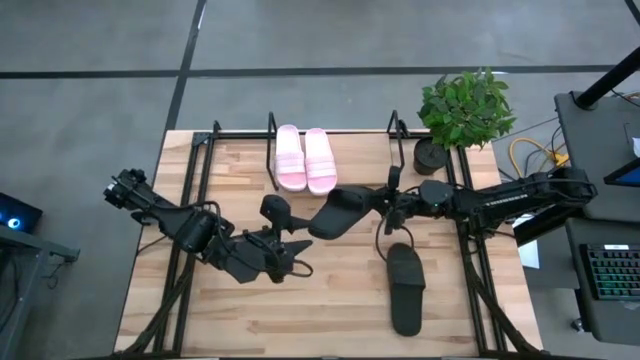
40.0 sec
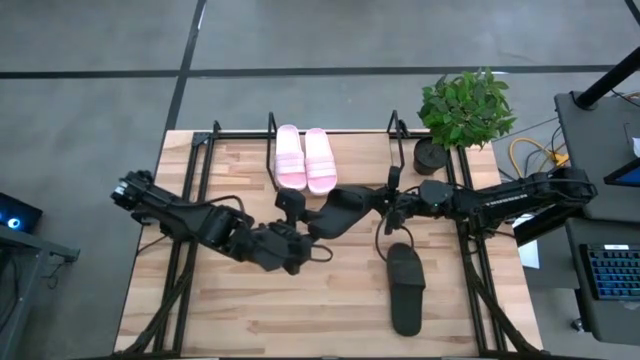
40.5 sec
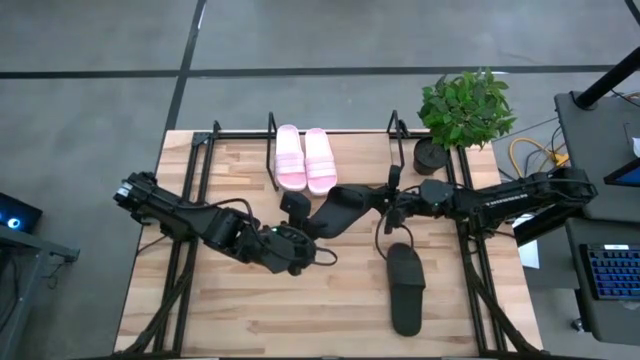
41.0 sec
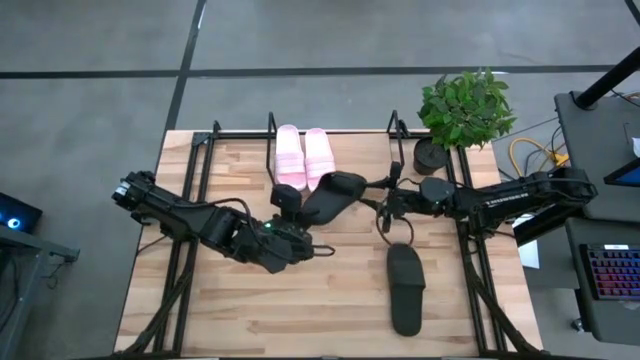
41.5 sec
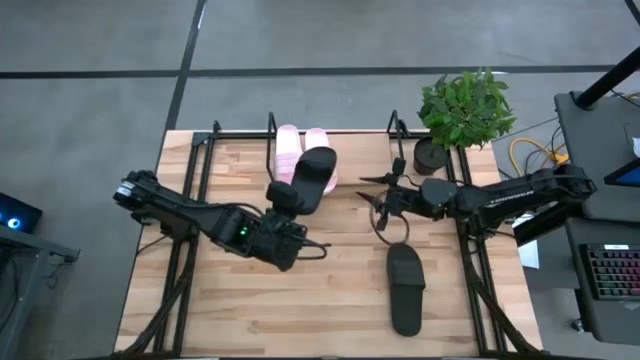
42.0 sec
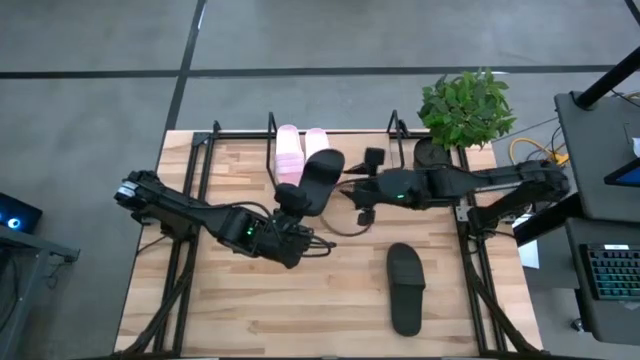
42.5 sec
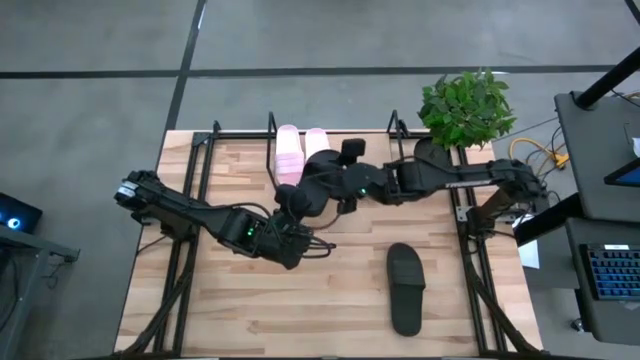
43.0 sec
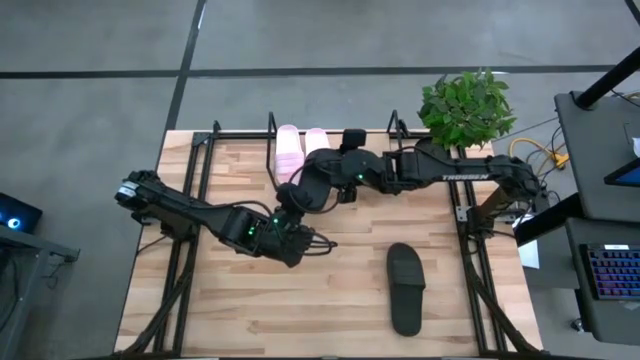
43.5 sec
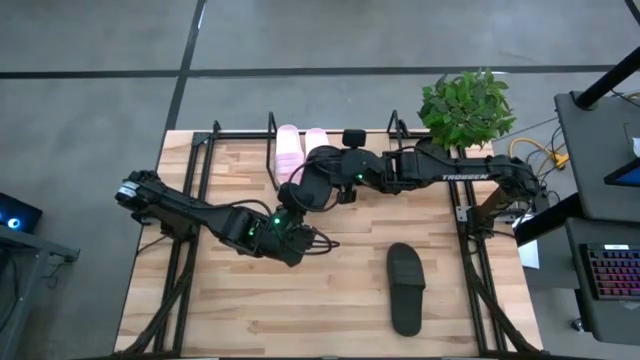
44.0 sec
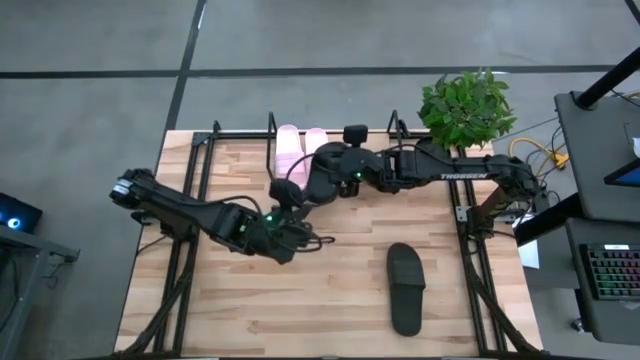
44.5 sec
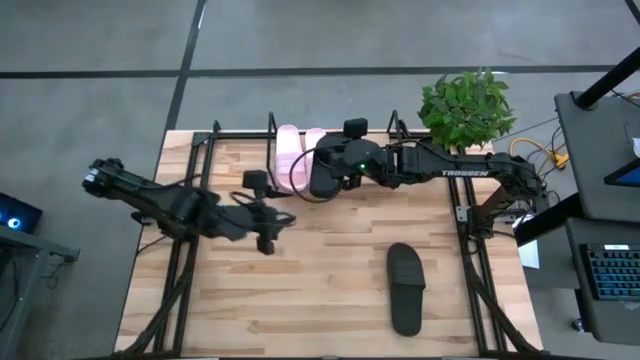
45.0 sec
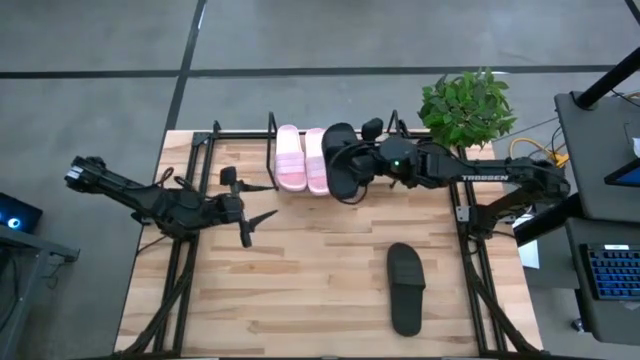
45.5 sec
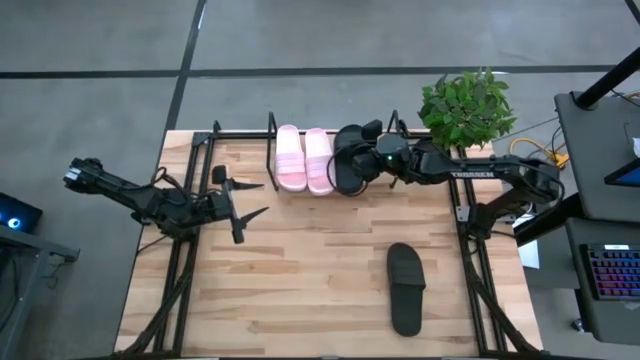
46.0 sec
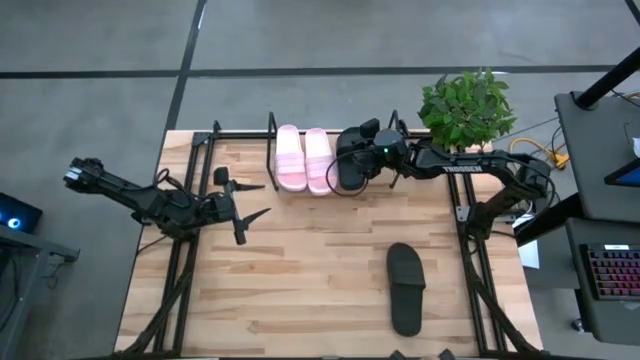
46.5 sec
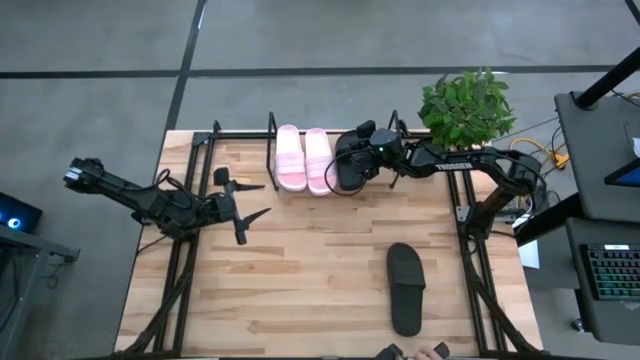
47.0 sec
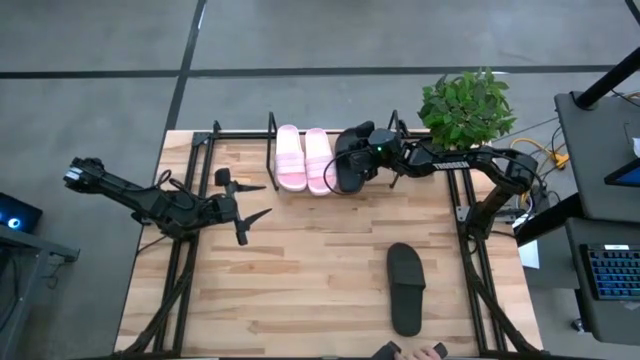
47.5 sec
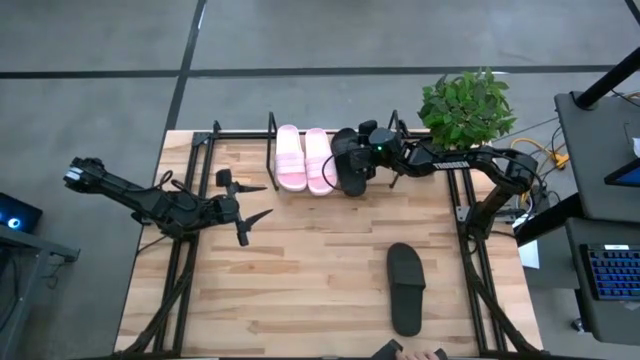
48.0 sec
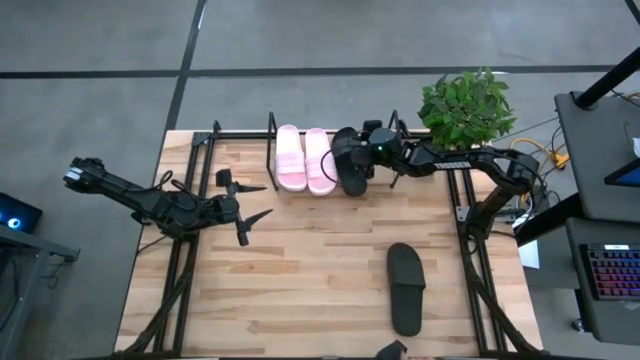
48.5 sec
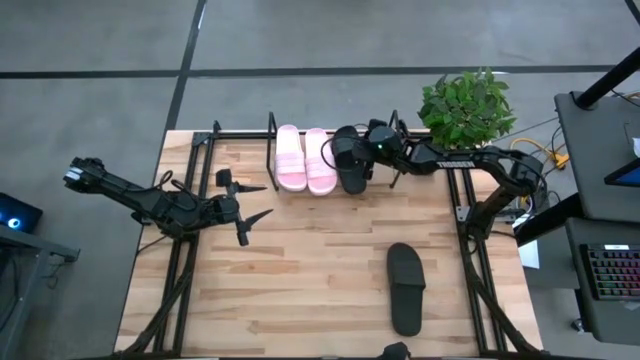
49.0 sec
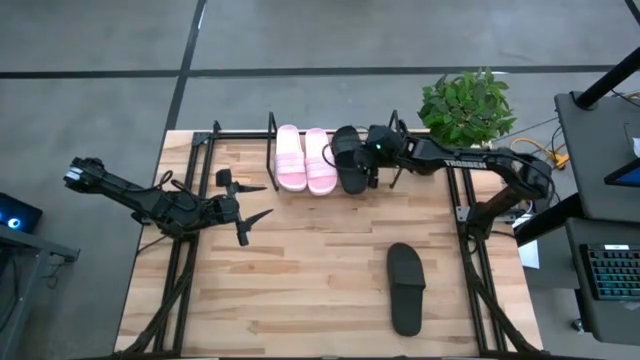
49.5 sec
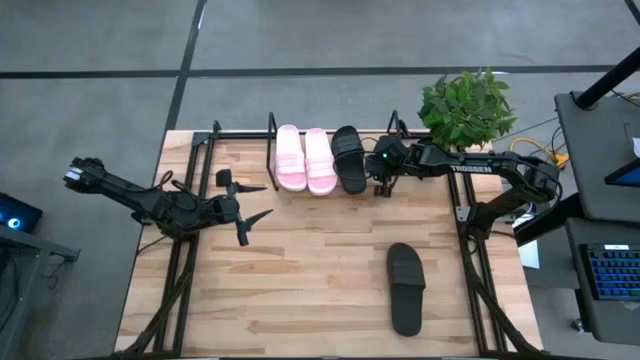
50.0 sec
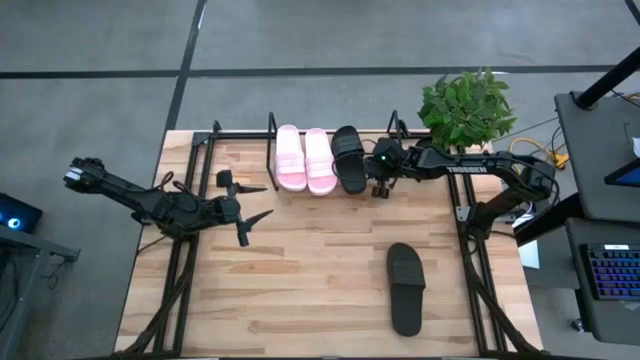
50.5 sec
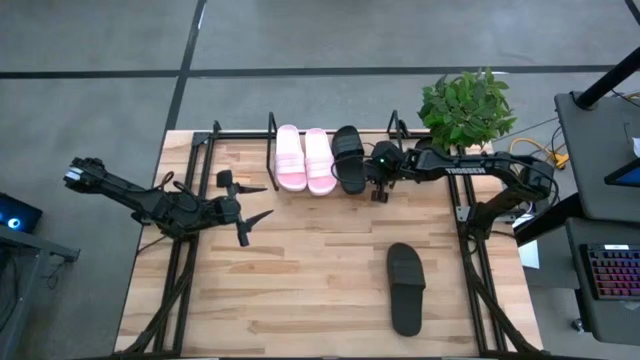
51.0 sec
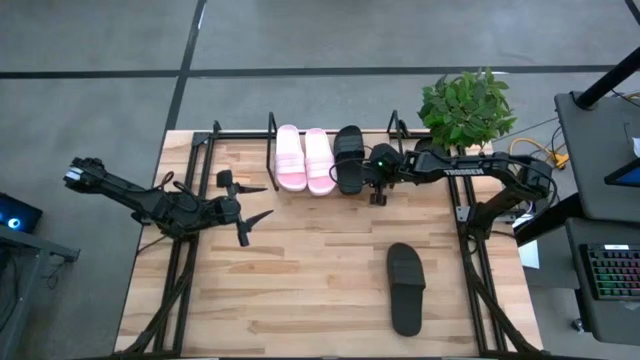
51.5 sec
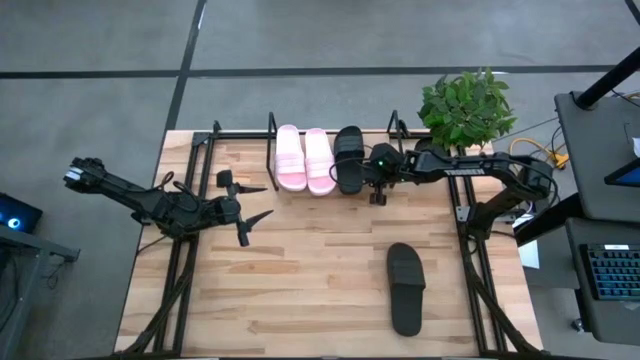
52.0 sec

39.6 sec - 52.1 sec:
Task: Pick and place slides into the shelf
Put the left black slides on the shelf

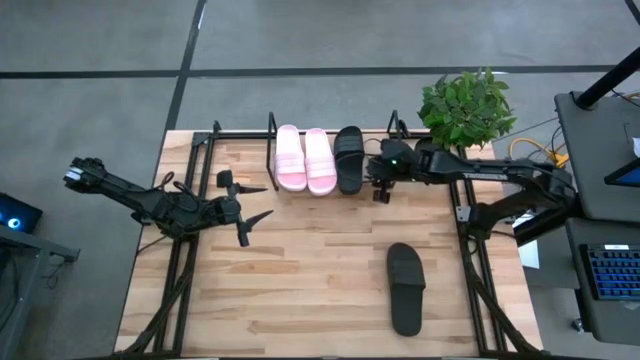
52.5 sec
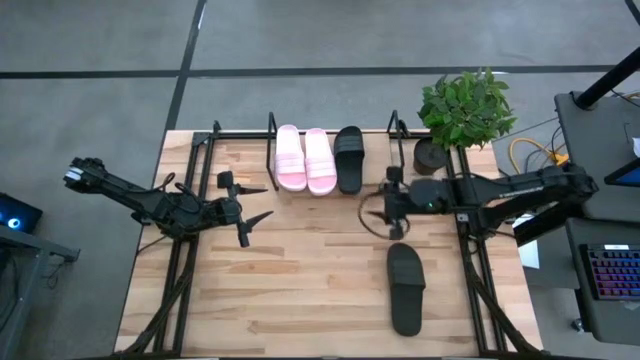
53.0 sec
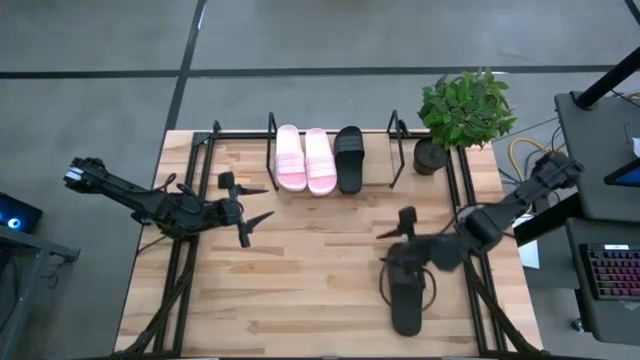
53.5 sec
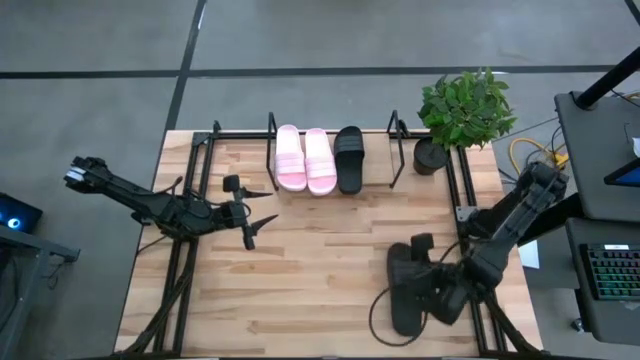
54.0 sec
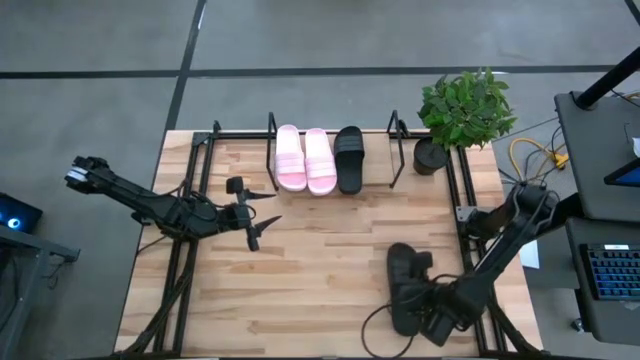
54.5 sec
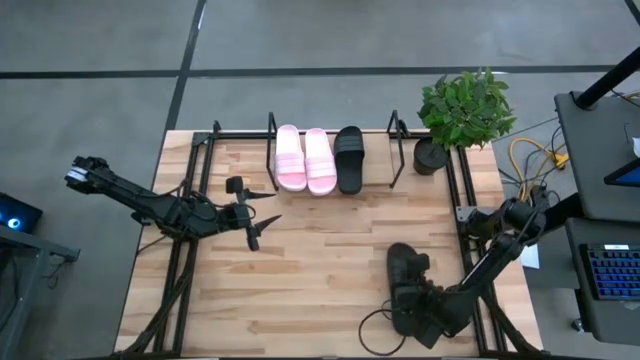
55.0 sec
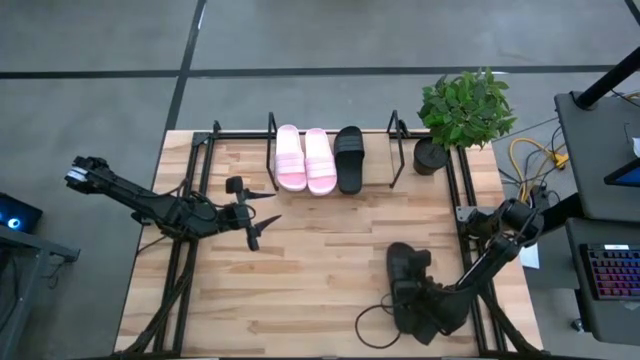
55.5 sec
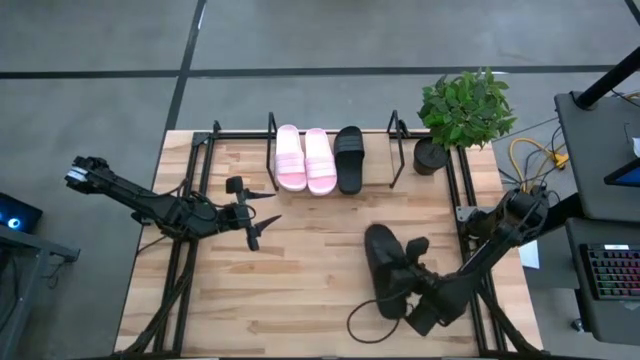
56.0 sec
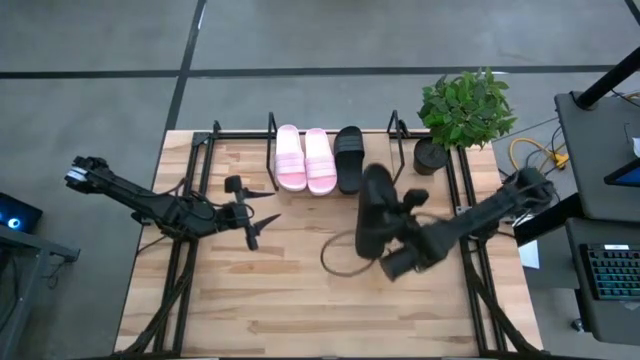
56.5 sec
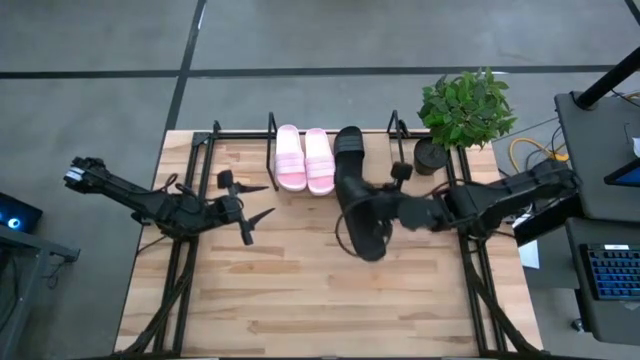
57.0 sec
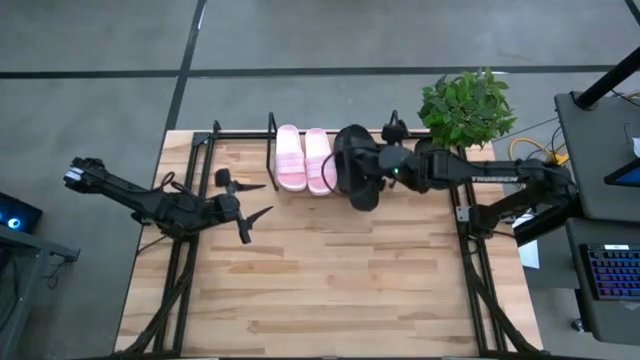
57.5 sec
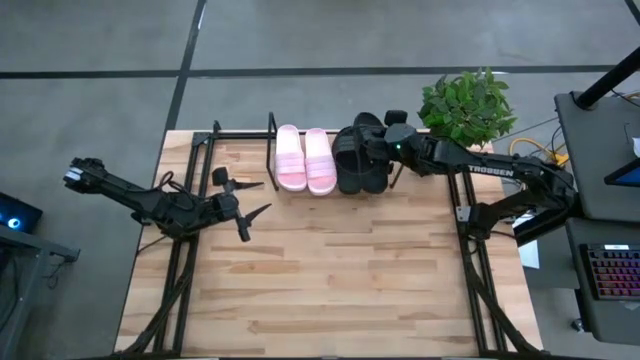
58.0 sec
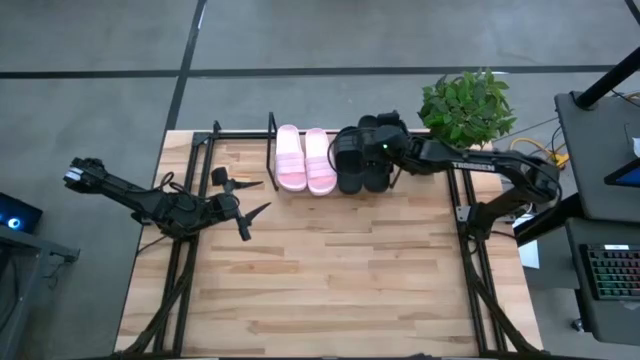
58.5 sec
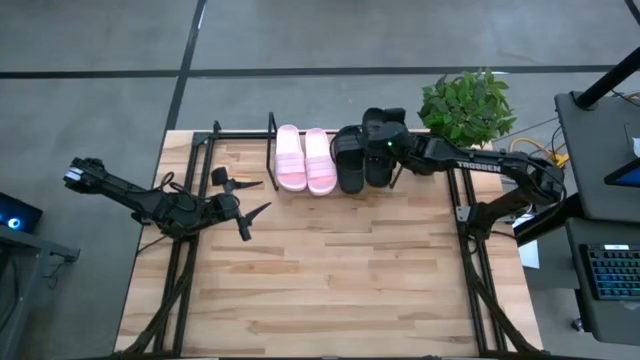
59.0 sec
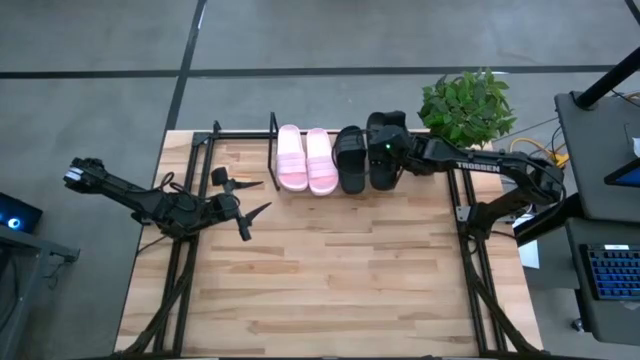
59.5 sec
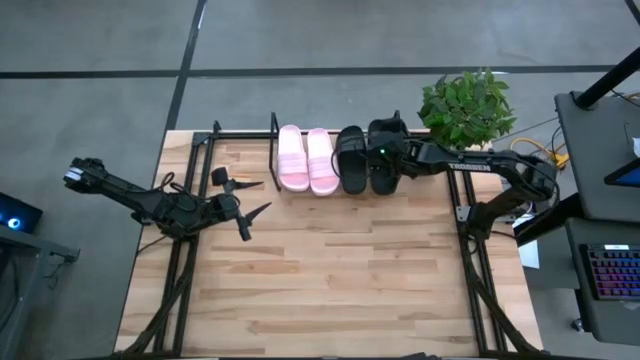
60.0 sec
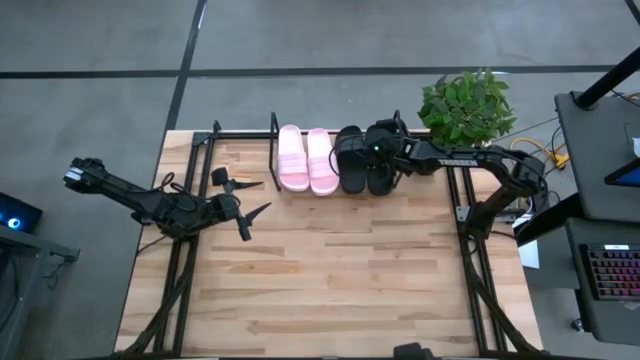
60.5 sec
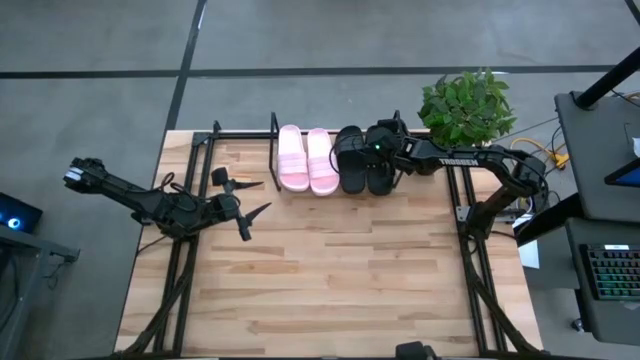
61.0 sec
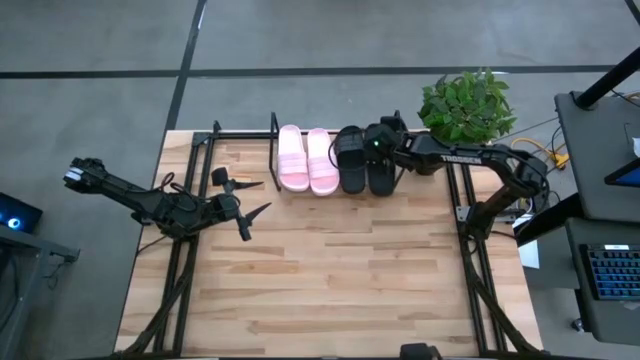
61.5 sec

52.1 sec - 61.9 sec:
Put the black slides on the shelf
